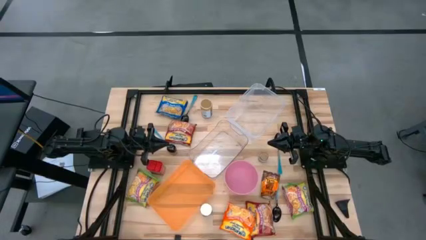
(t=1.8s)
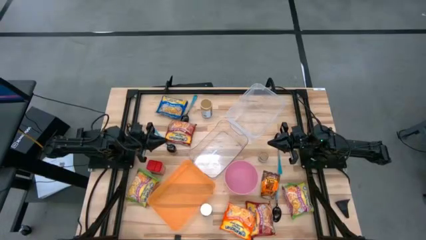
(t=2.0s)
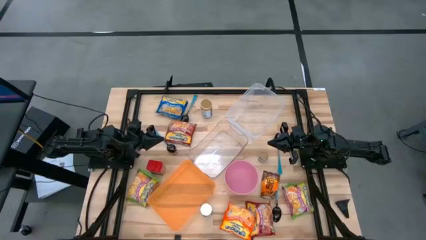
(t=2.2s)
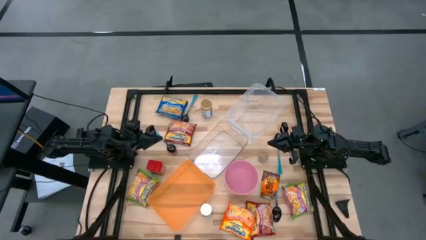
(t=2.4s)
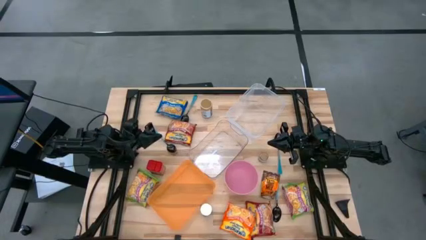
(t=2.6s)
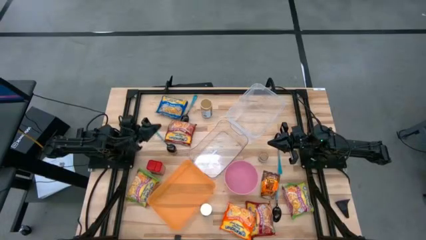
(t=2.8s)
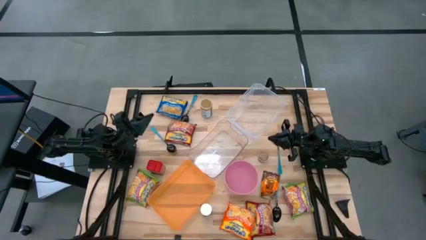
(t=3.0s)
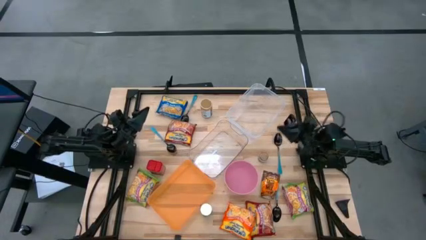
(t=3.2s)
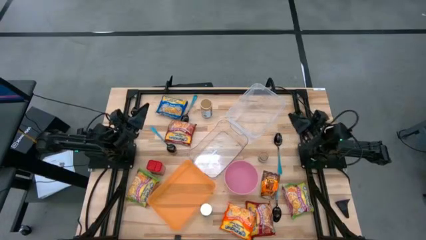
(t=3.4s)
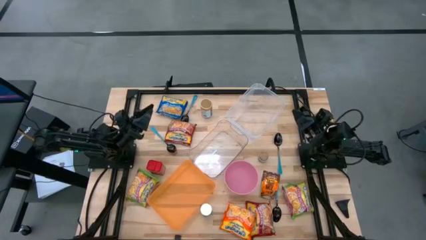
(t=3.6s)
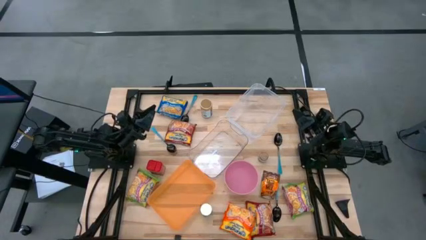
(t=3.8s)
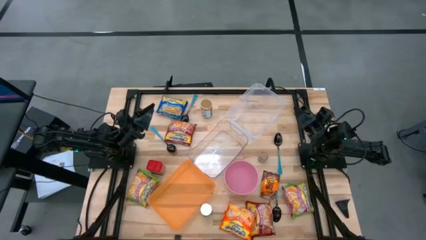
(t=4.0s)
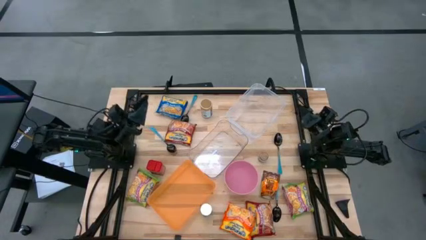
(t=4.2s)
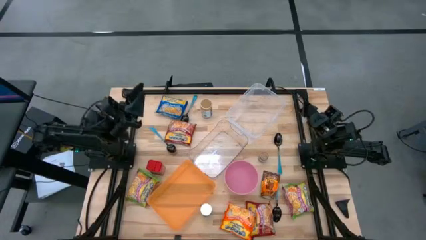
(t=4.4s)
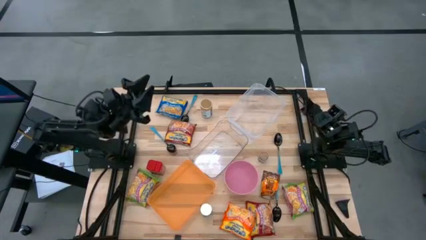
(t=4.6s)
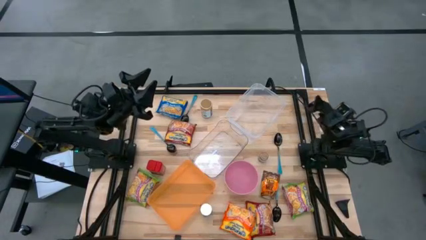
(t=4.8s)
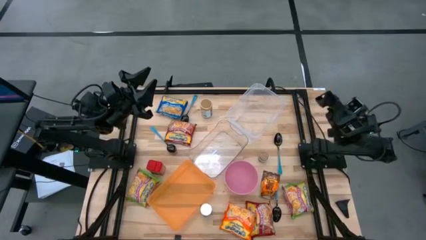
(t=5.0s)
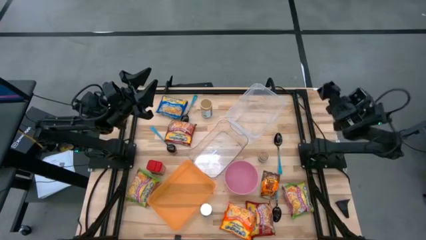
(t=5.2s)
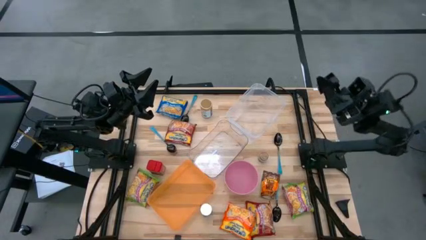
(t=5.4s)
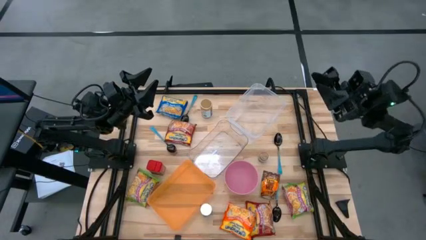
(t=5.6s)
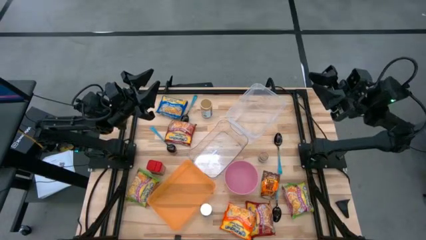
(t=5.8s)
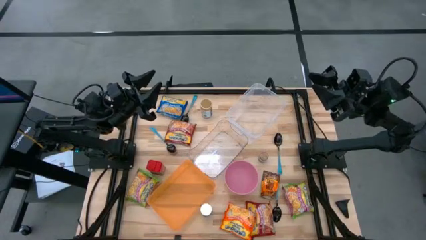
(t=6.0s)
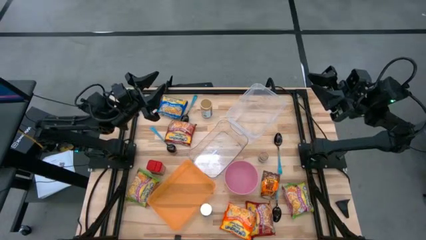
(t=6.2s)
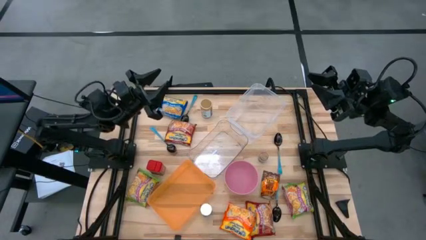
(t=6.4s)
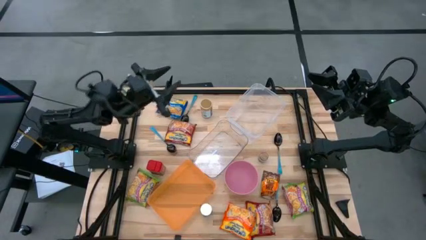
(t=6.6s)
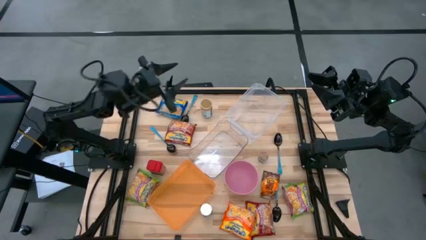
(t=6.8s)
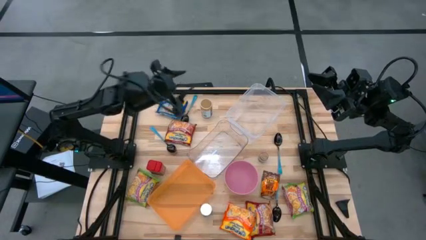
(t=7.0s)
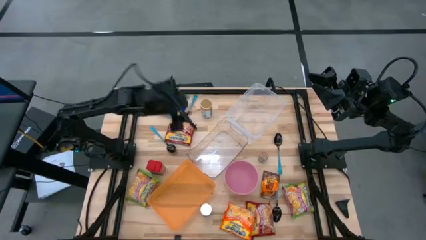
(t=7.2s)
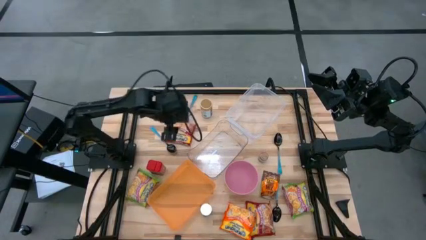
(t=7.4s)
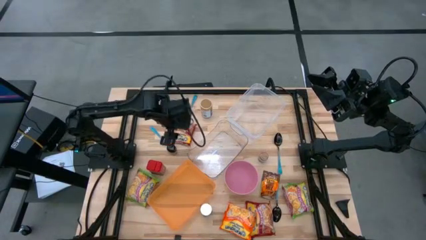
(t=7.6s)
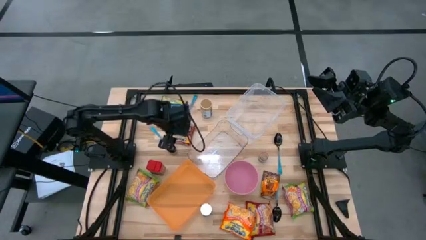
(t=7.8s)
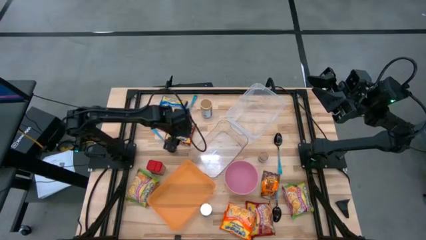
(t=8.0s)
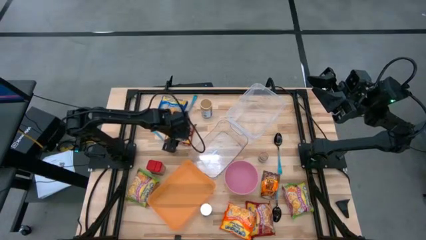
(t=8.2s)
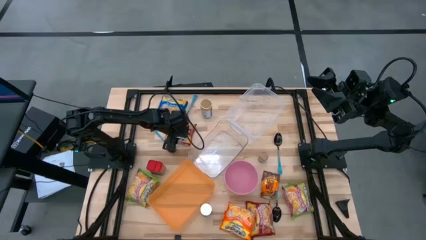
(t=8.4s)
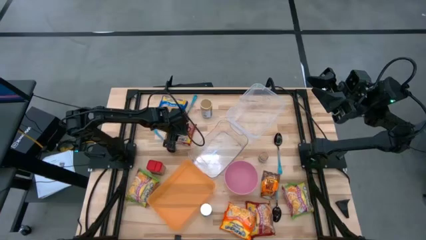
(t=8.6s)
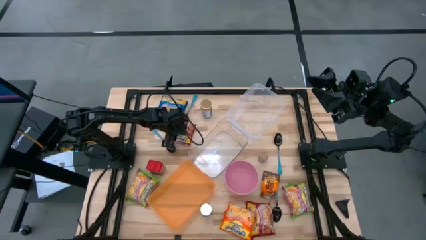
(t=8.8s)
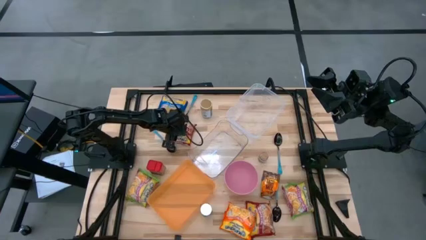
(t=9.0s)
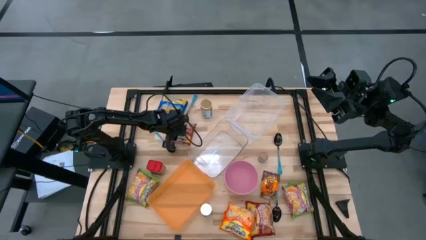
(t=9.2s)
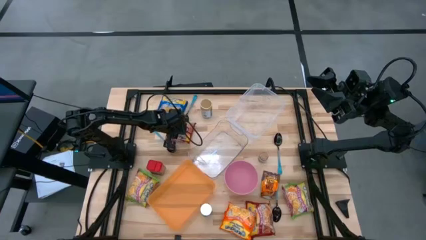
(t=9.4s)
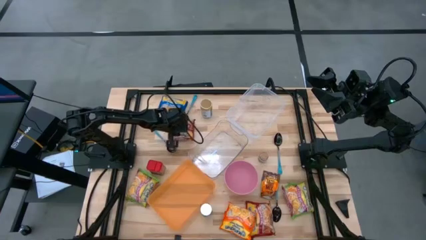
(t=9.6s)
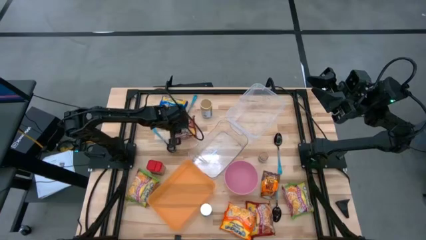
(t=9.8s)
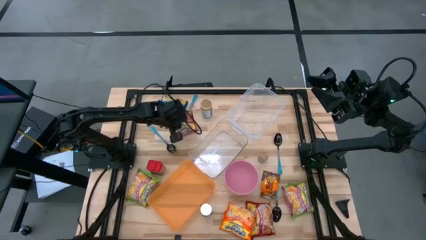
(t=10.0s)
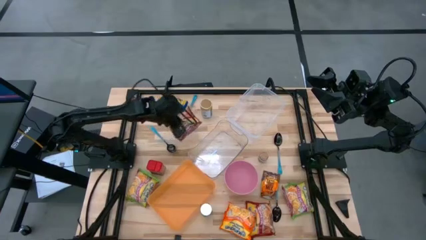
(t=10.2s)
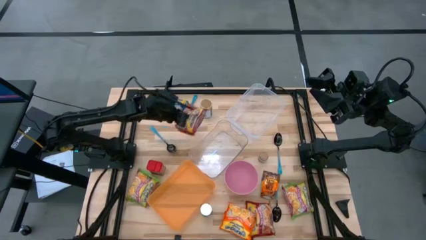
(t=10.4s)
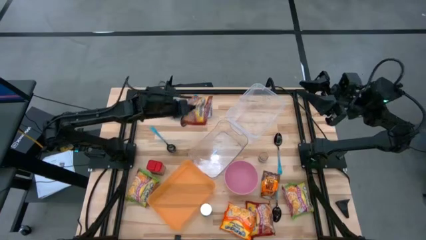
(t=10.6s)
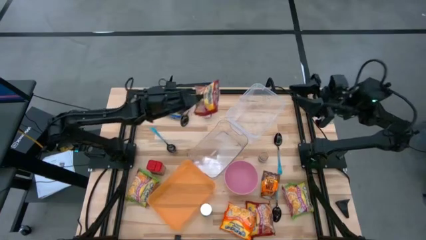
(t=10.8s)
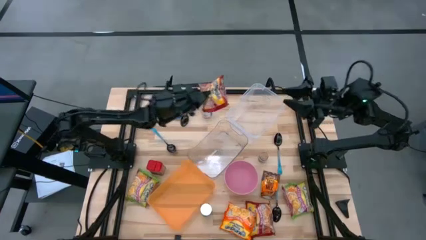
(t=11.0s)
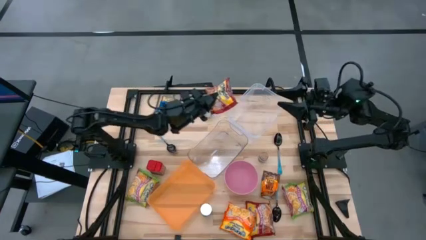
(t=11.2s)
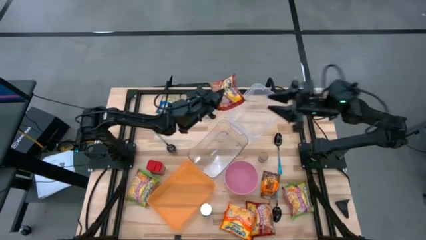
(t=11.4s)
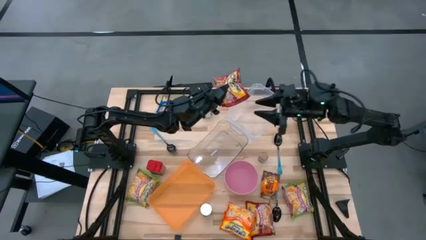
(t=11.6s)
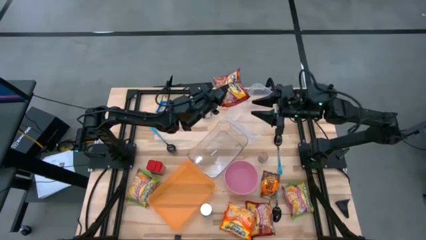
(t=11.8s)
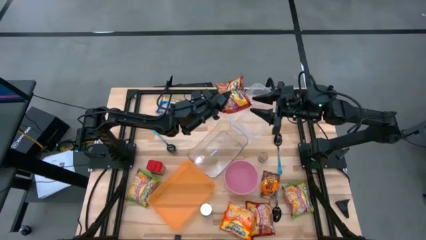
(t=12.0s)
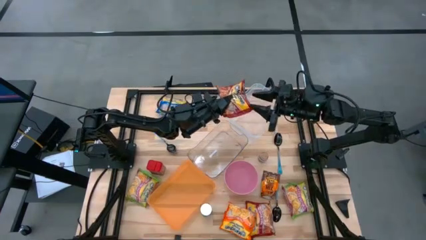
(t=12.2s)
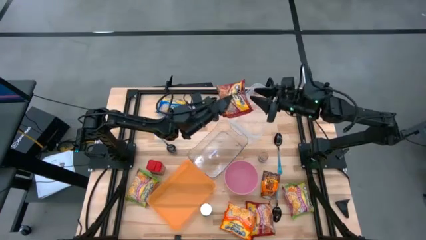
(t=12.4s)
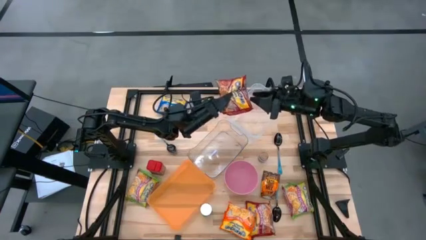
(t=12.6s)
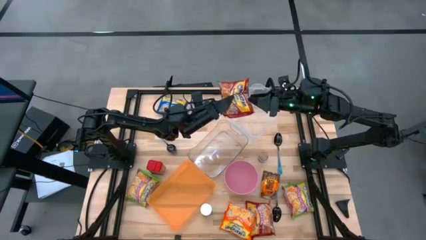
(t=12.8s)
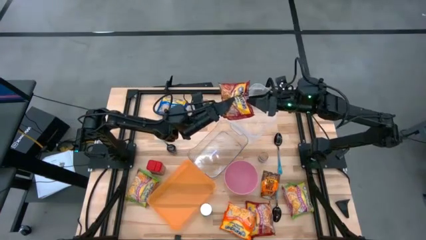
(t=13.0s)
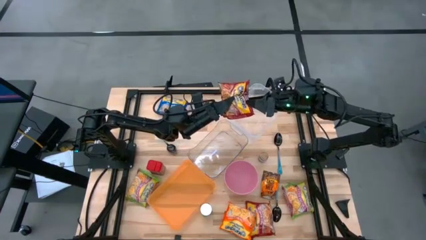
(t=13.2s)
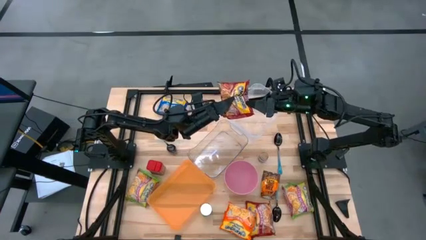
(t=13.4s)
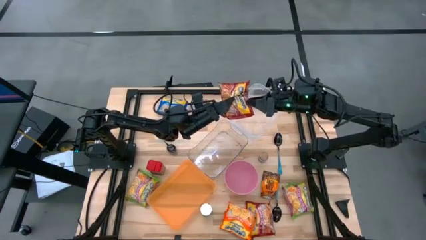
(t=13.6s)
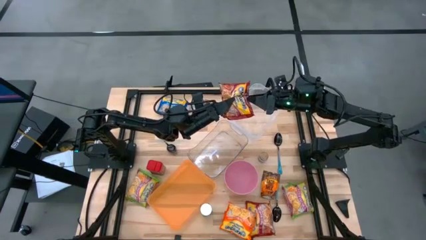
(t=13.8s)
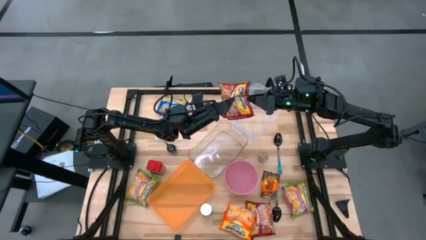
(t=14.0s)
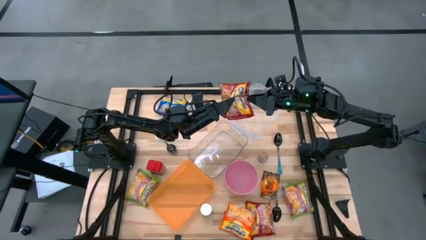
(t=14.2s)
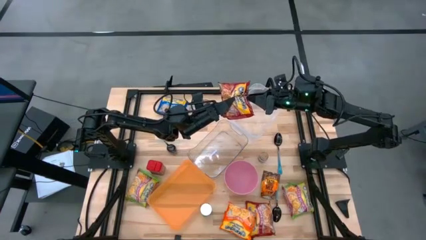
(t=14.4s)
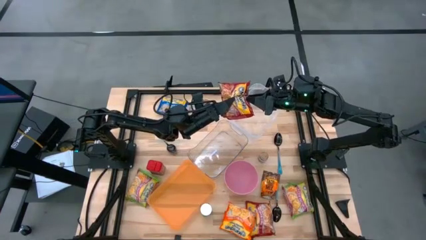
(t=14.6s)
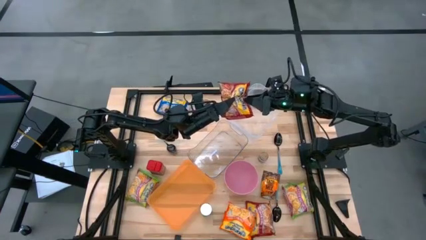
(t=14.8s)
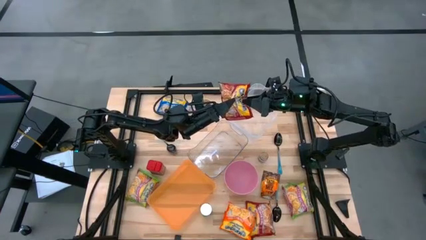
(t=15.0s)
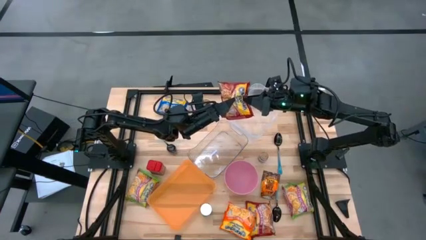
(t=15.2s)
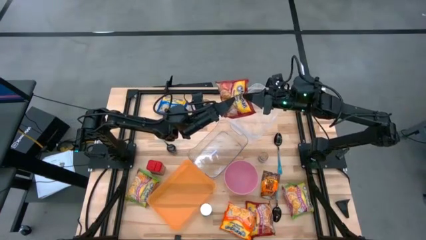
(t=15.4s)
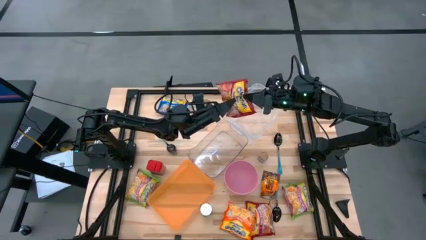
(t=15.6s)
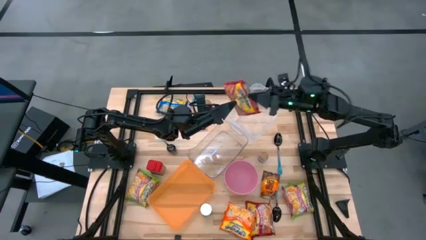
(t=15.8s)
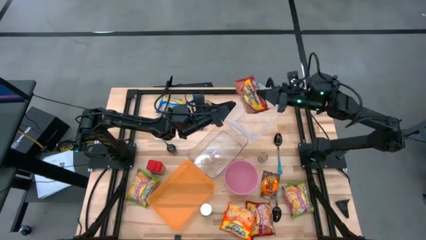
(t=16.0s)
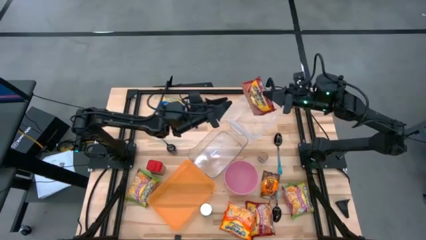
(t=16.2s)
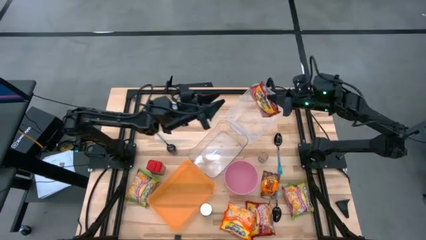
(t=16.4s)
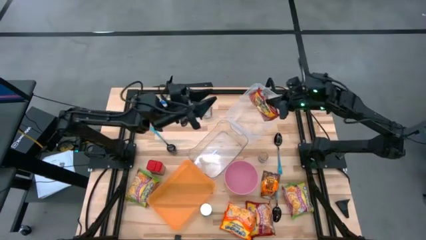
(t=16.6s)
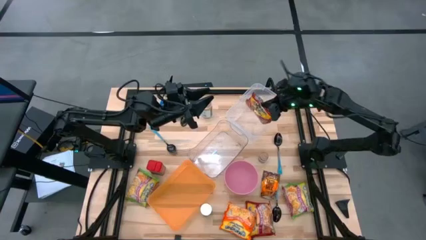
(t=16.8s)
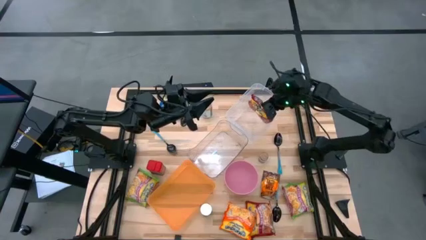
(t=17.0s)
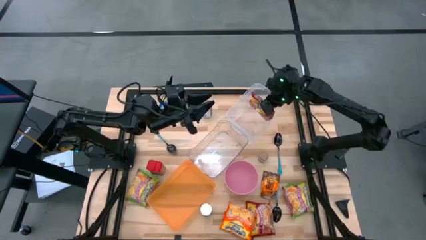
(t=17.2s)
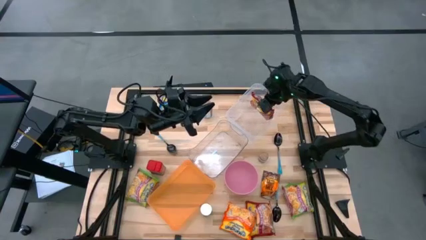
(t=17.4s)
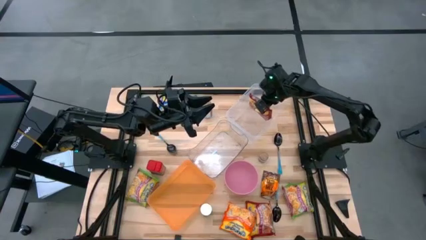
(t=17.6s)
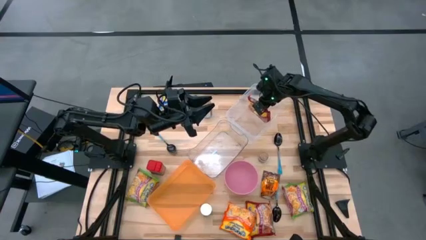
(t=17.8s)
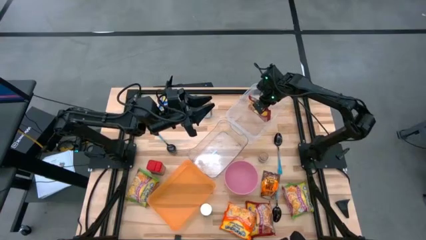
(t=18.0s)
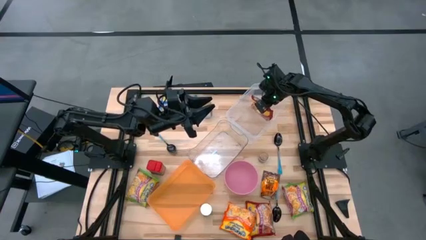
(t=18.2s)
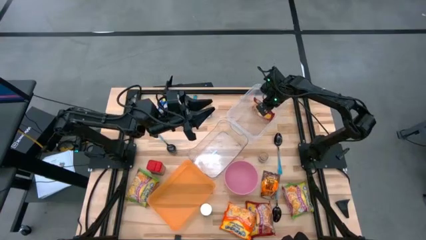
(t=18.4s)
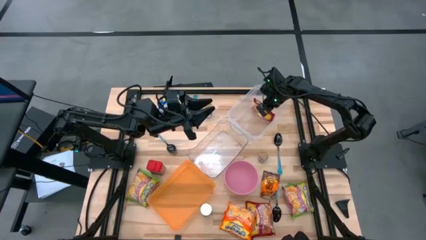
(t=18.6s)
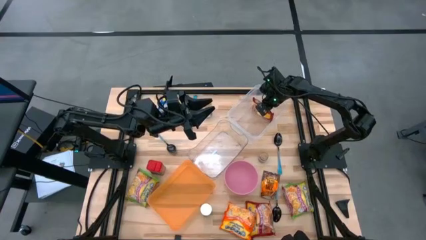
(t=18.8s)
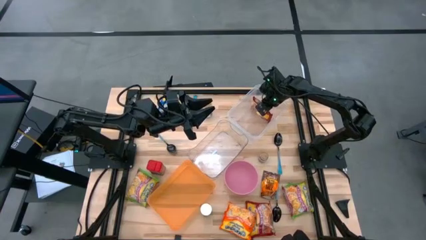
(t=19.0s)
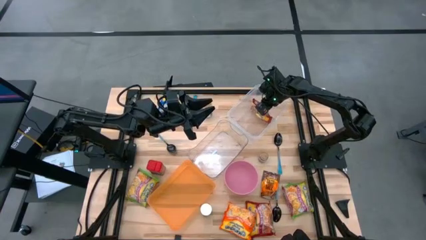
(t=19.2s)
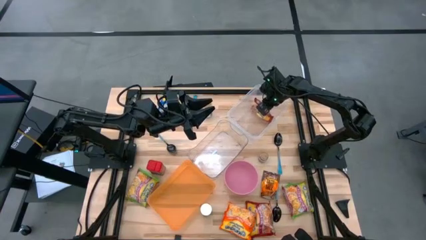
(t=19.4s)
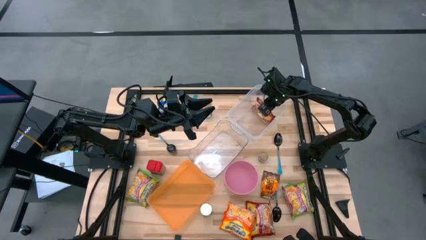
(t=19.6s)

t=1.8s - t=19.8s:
Task: Pick & Place Food Item
Put the red noodle pack into the transparent container
